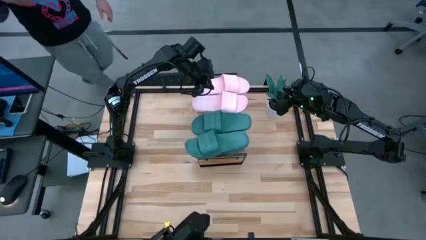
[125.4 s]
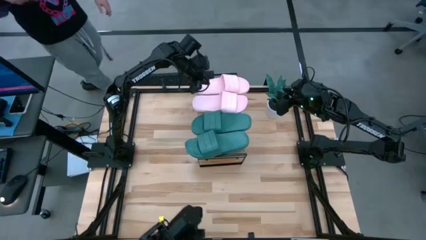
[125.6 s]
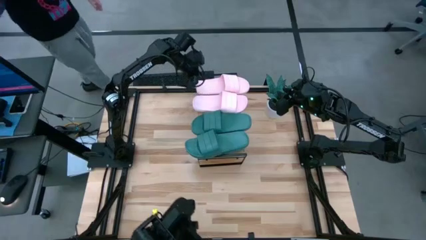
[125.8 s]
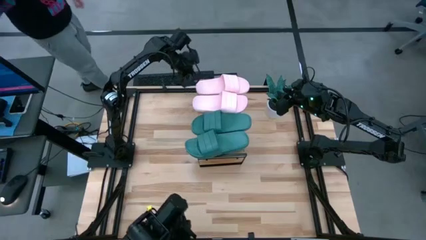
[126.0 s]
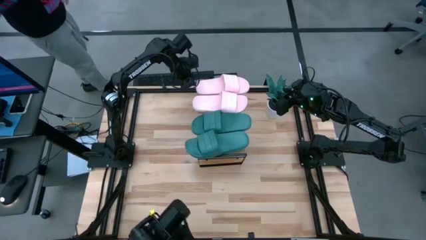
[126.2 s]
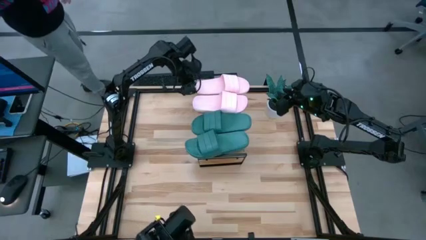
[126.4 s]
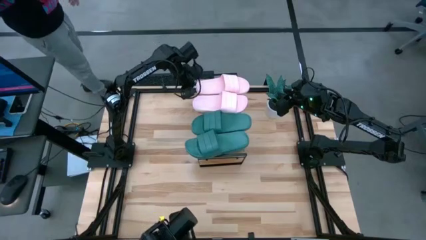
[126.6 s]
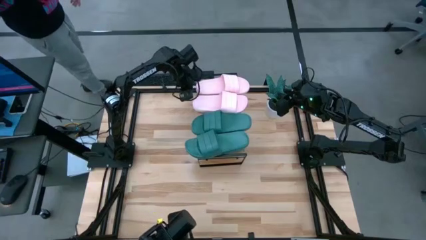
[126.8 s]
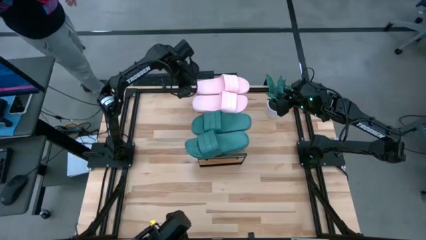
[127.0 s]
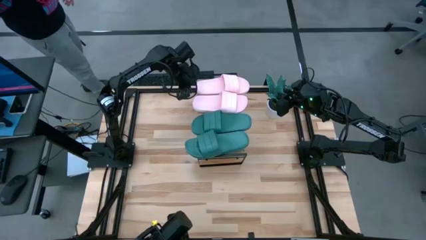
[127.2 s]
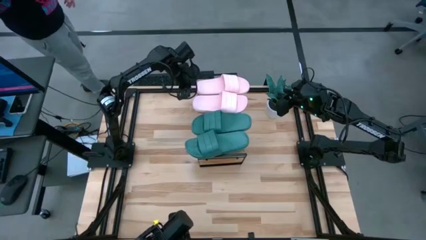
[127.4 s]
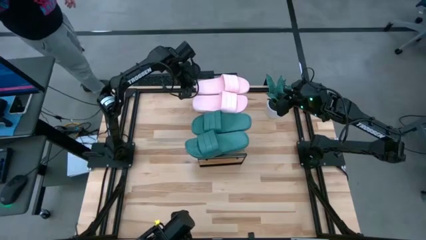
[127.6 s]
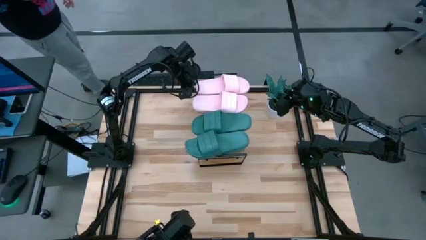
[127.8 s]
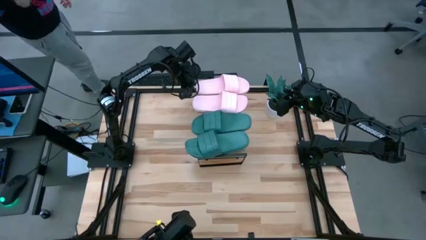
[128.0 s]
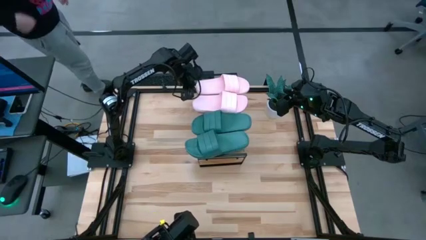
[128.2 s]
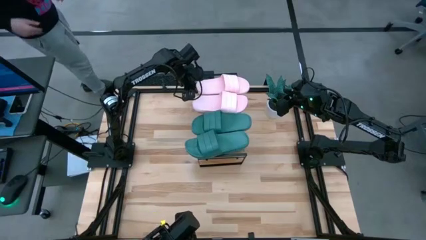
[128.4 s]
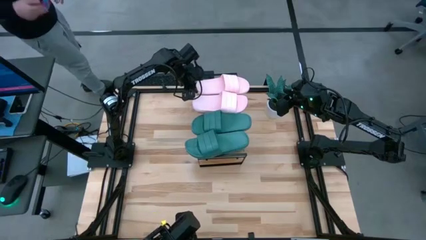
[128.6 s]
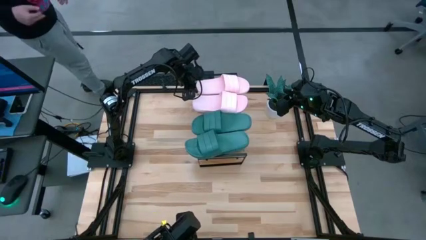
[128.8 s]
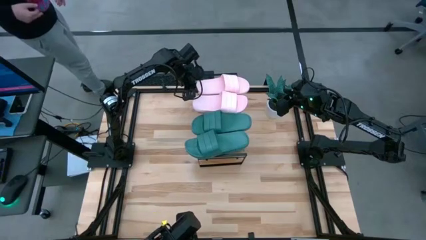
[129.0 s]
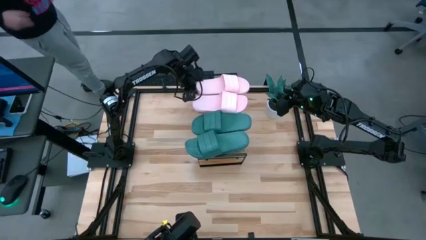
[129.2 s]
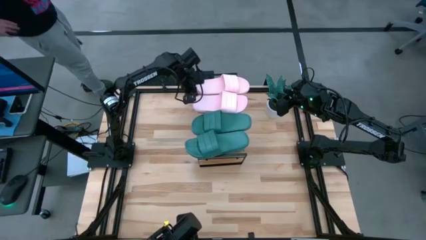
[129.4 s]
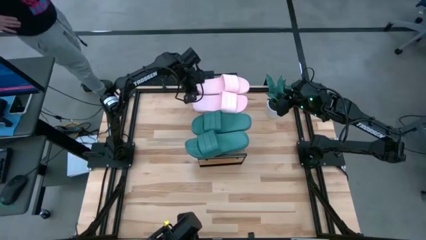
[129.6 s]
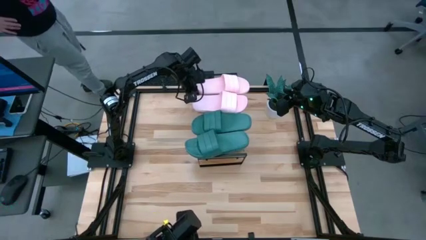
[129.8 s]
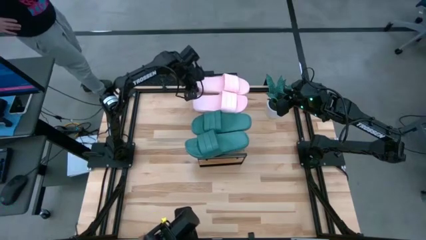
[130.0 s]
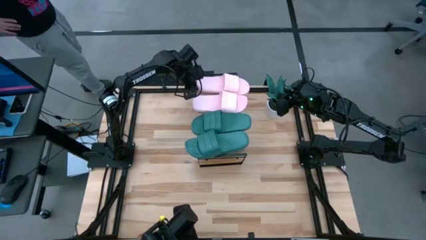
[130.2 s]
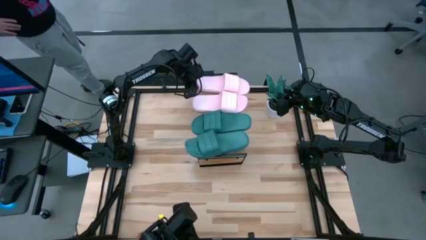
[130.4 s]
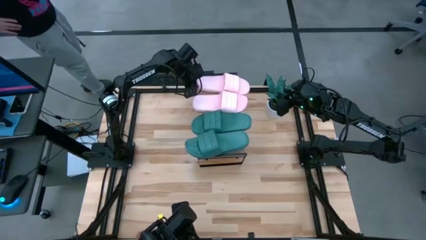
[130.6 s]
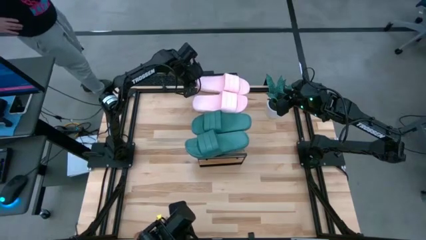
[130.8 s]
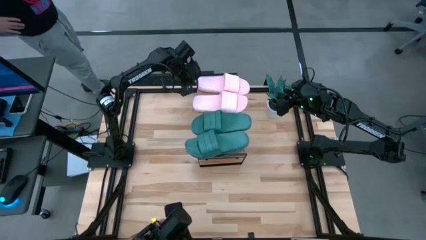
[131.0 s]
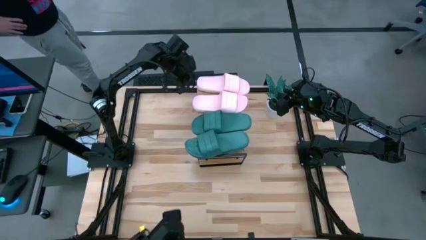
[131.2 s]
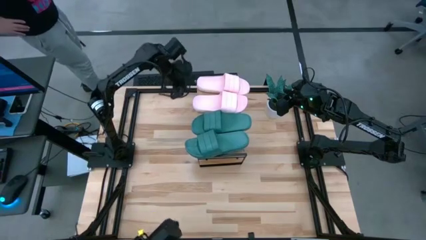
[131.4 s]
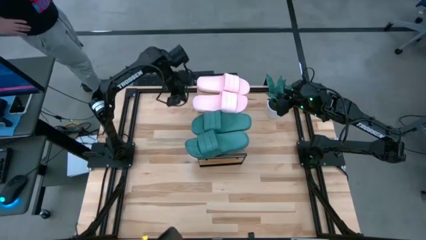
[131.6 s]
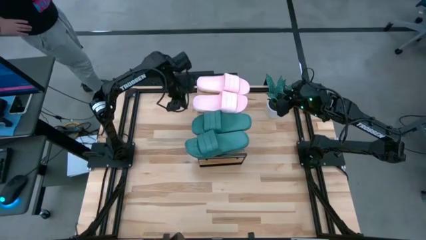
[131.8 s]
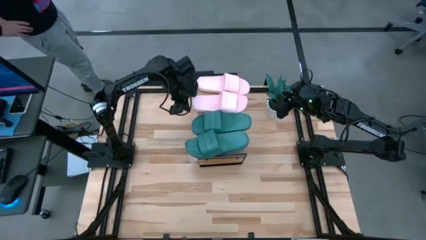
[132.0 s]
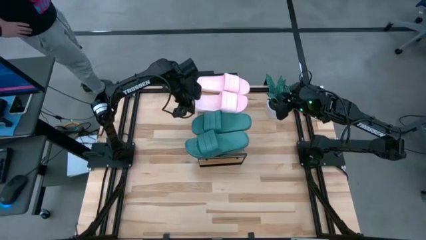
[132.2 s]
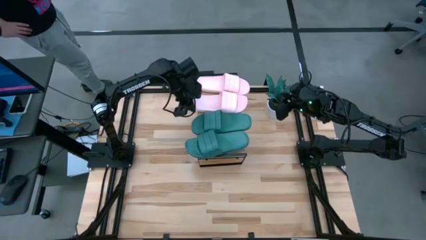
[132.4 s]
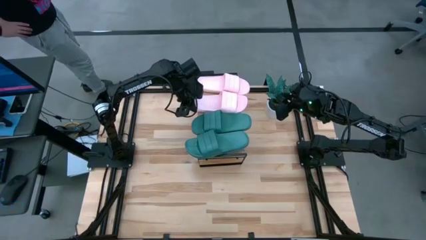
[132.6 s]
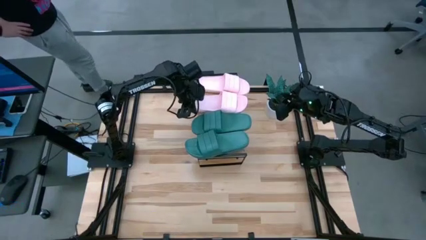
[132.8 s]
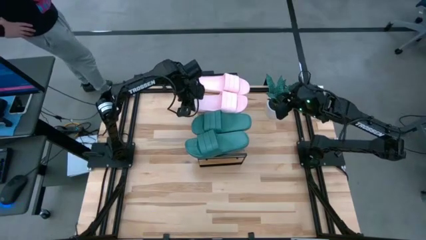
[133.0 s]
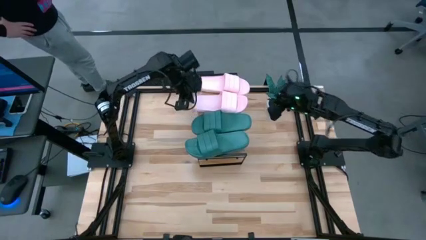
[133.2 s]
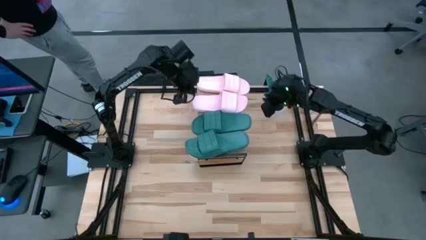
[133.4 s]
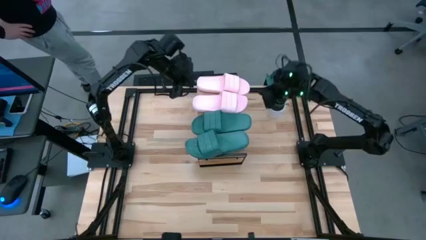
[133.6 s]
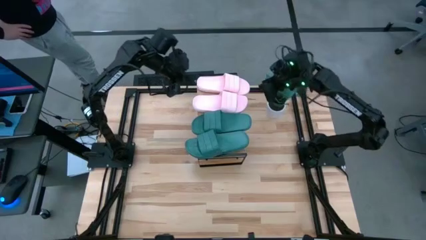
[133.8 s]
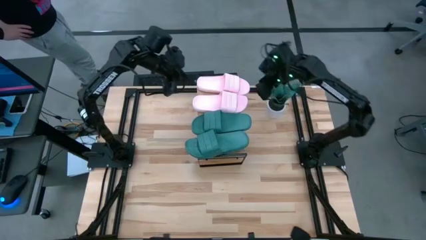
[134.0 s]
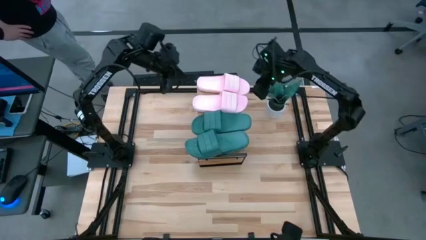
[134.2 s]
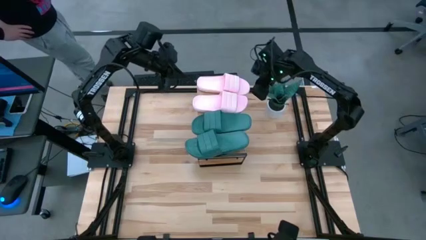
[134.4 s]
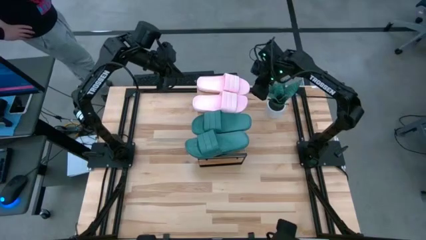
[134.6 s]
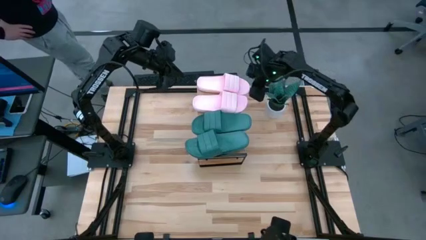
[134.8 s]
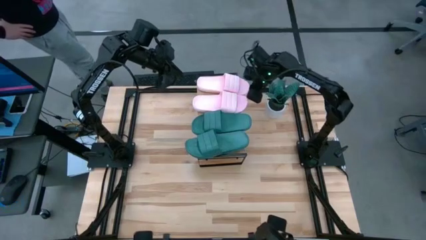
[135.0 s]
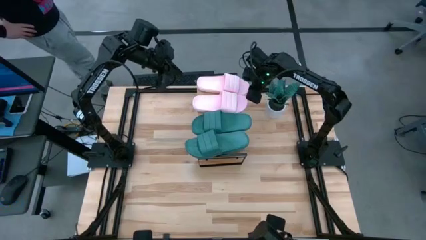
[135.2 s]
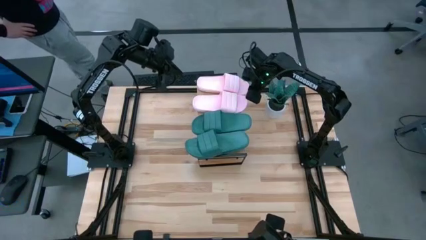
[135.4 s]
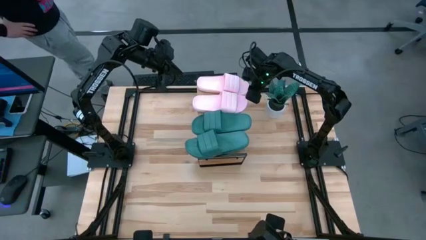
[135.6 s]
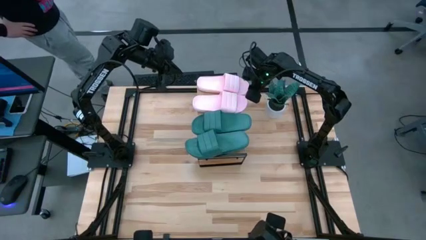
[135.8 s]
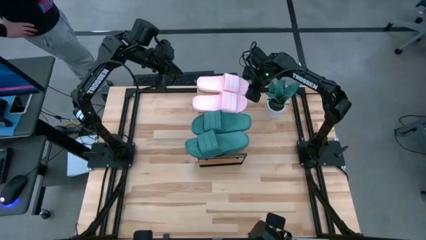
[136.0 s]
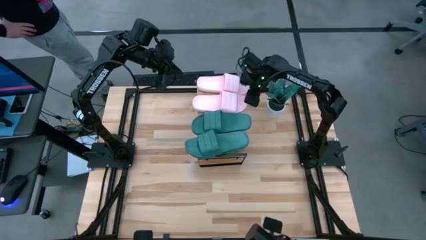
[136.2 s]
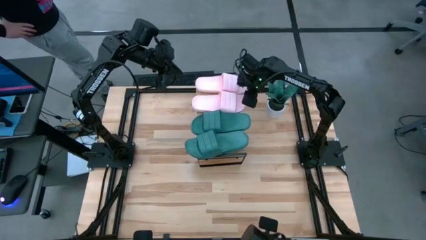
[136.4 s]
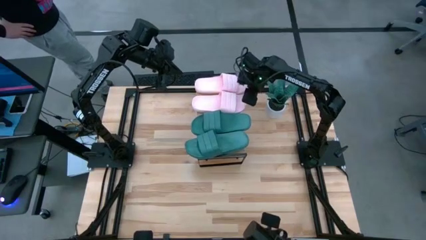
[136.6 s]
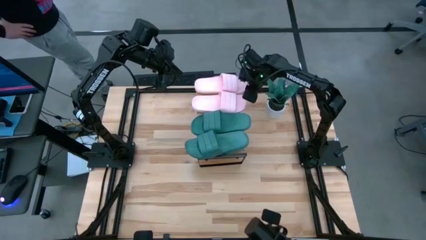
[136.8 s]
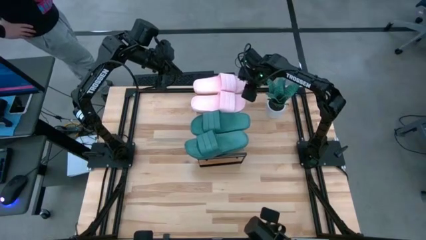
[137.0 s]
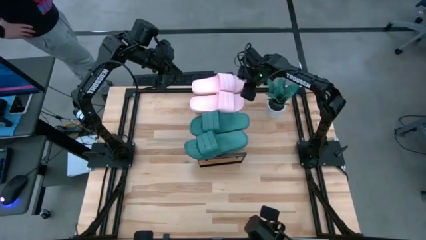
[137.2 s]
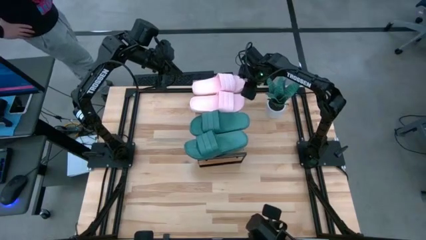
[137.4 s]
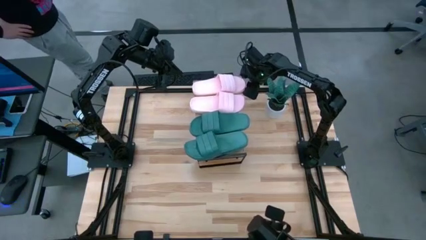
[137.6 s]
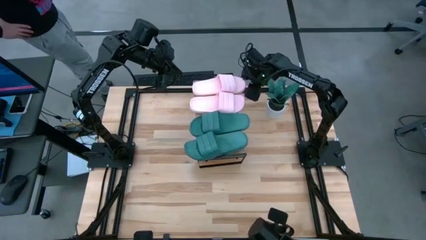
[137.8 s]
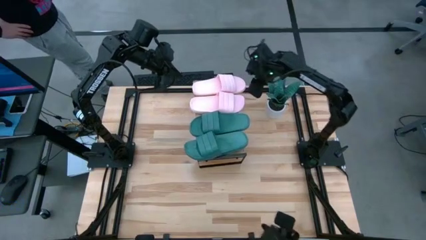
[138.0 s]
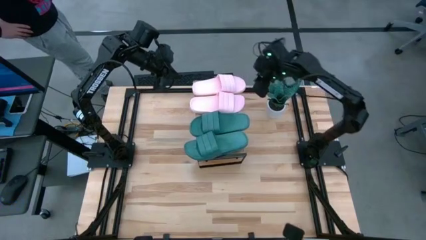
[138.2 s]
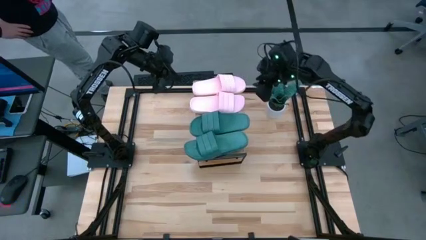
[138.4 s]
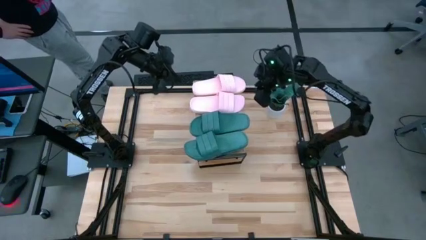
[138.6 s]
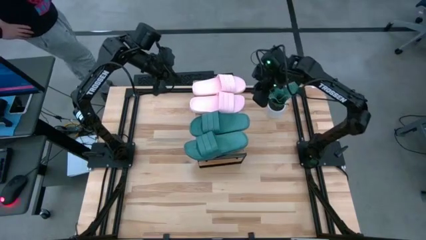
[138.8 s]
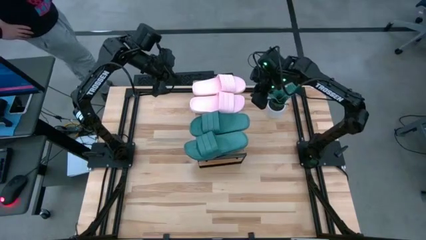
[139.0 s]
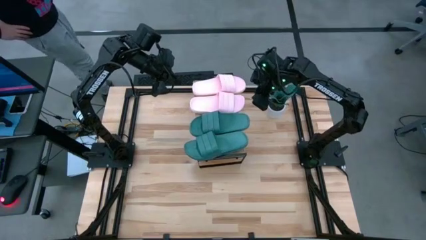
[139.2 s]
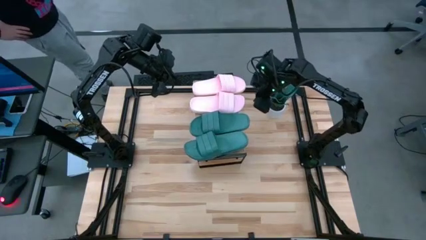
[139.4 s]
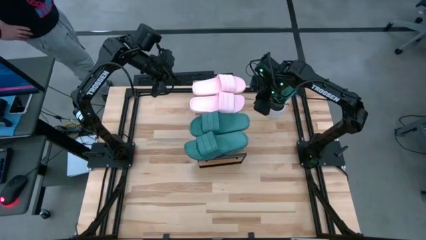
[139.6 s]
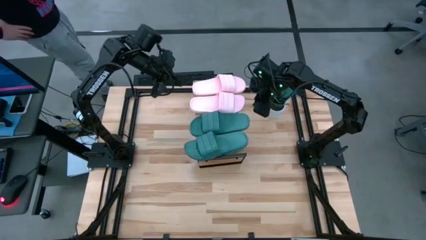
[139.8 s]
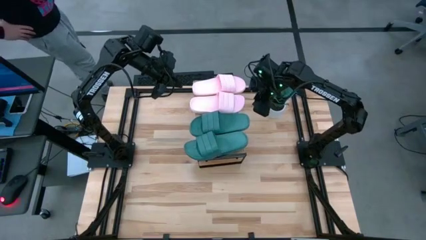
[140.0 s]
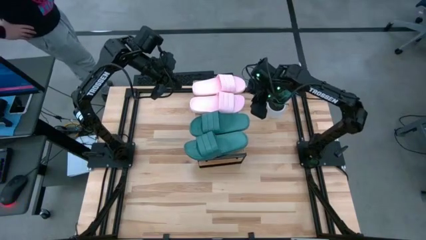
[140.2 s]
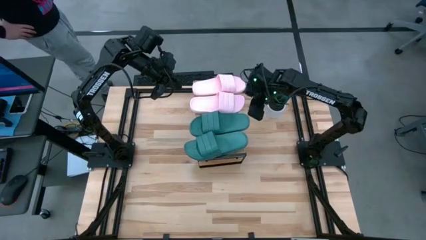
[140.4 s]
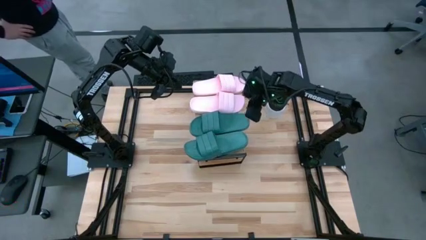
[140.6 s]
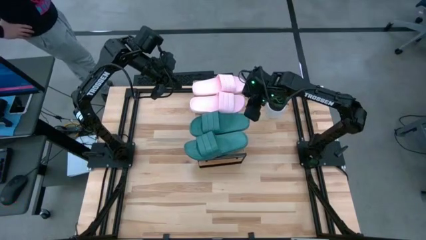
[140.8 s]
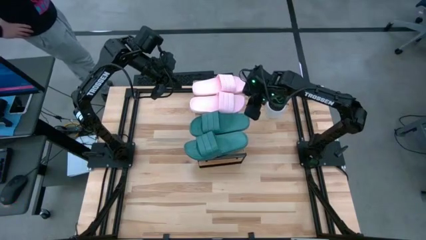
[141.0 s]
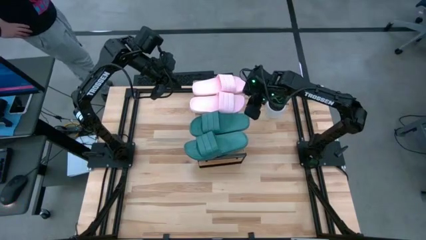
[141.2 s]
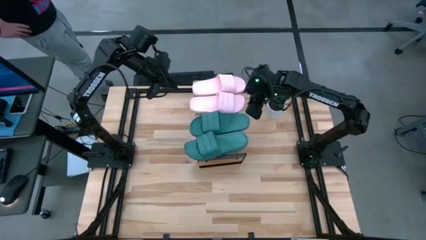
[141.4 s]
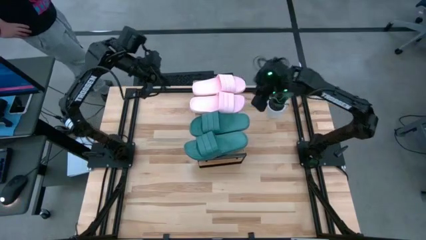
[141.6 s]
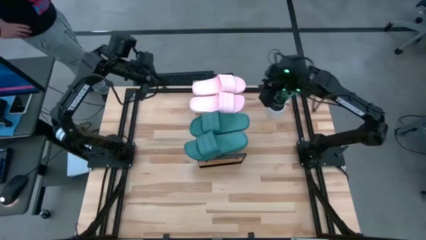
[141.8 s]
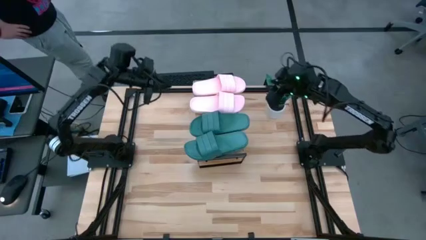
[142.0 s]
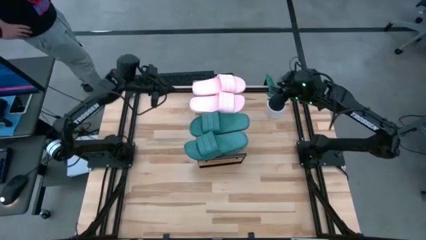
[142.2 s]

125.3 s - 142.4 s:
Task: Pick and place slides into the shelf
Adjust the slides on the shelf
